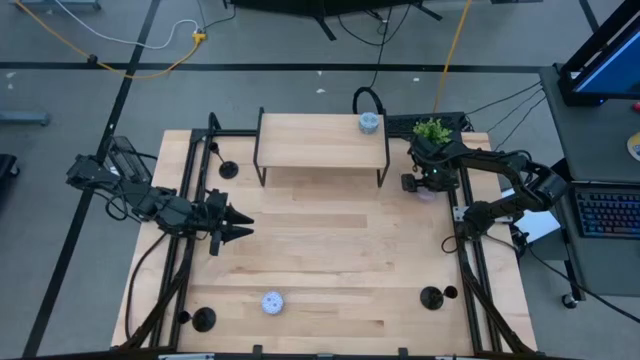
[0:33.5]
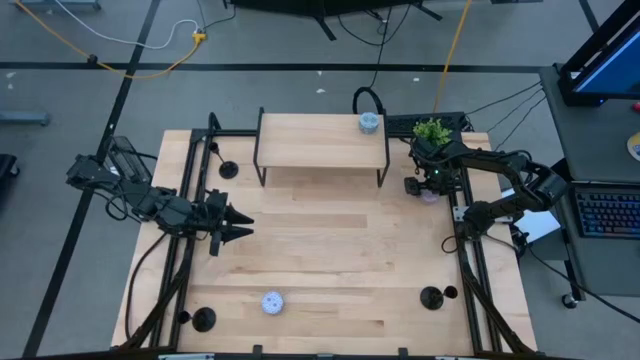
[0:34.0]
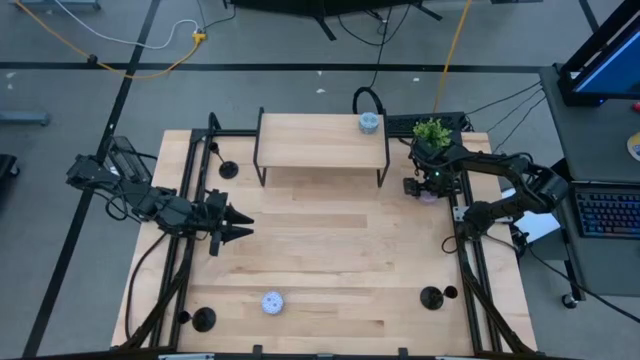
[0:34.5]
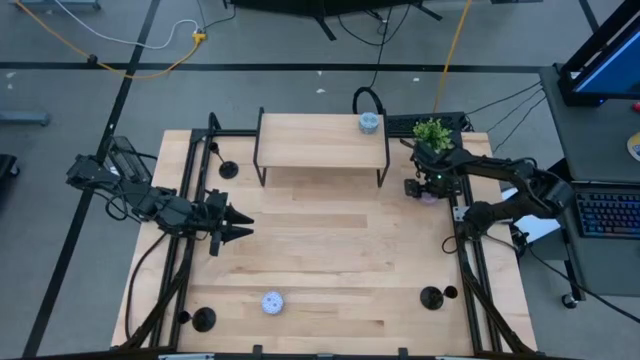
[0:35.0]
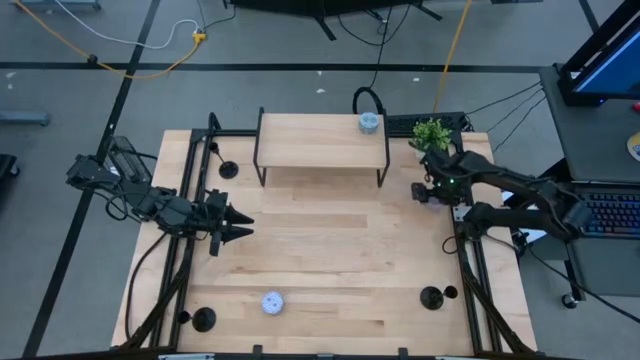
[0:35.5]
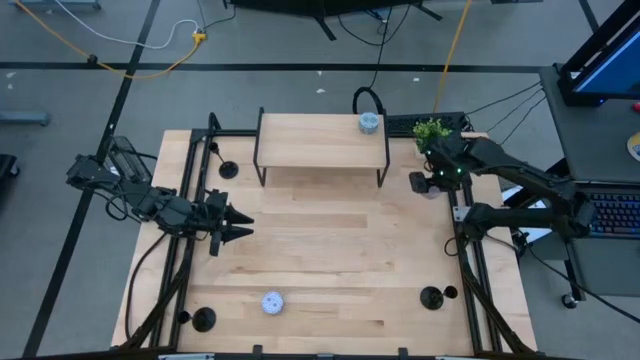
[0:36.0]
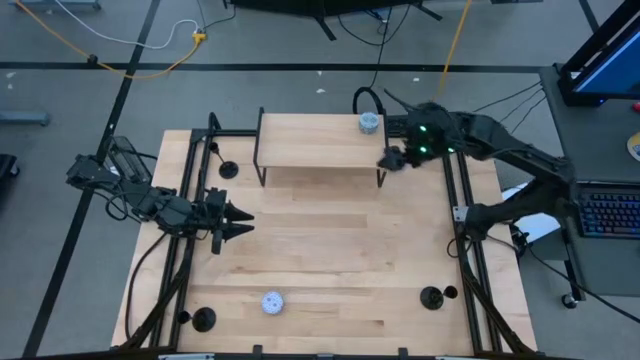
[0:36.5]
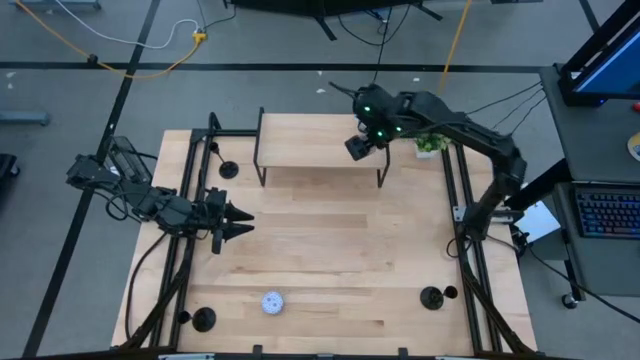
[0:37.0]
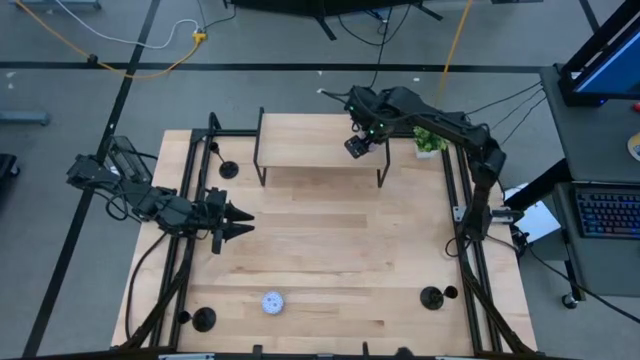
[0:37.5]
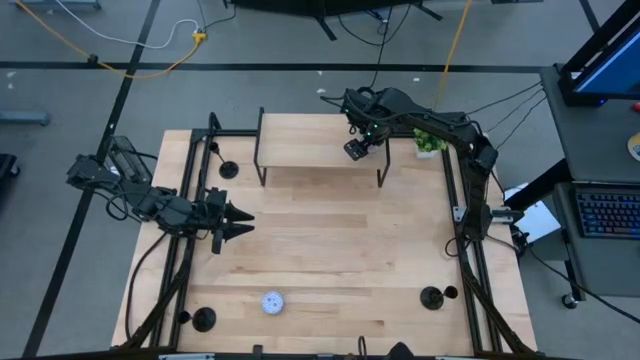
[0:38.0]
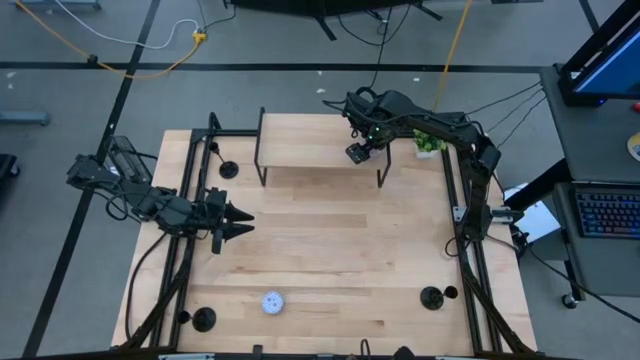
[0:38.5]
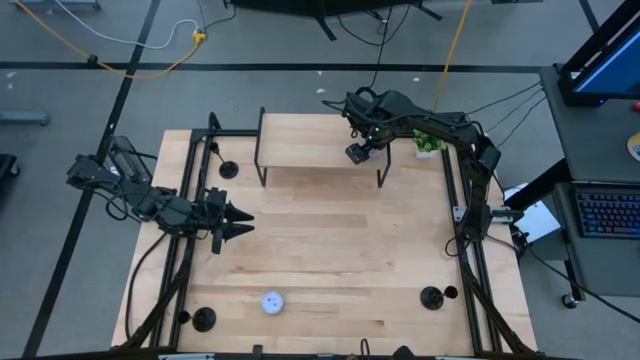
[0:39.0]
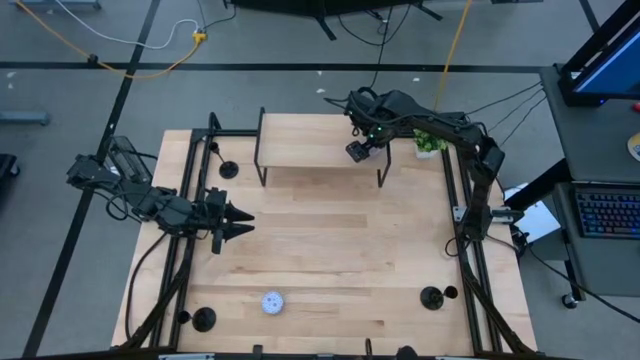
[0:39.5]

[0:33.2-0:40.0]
Task: Pick & Place candle stick holders
Put the purple scented candle on the shelf

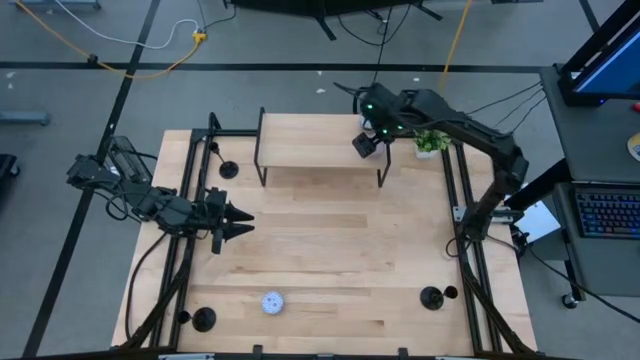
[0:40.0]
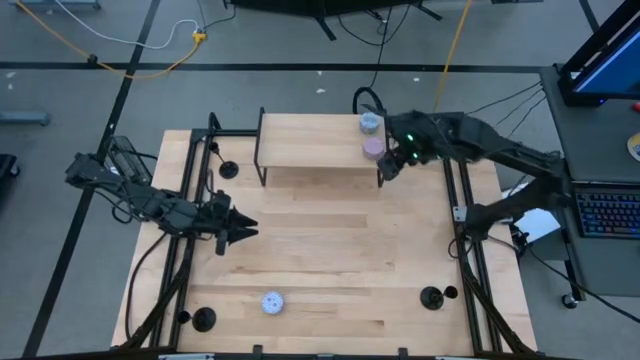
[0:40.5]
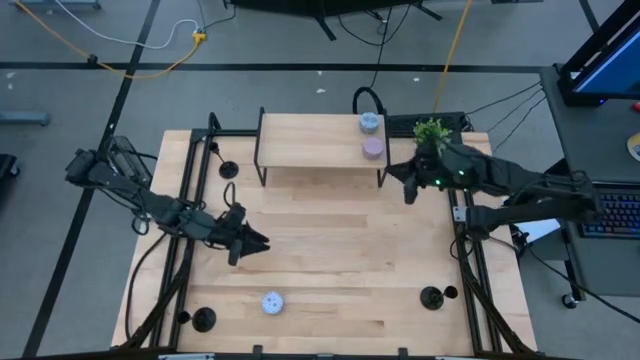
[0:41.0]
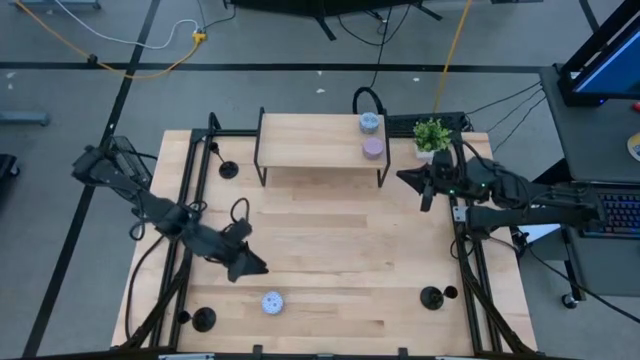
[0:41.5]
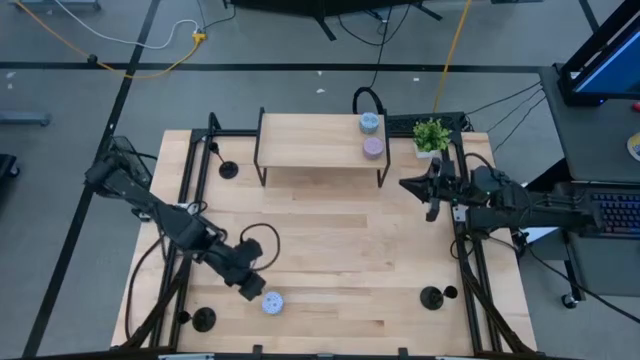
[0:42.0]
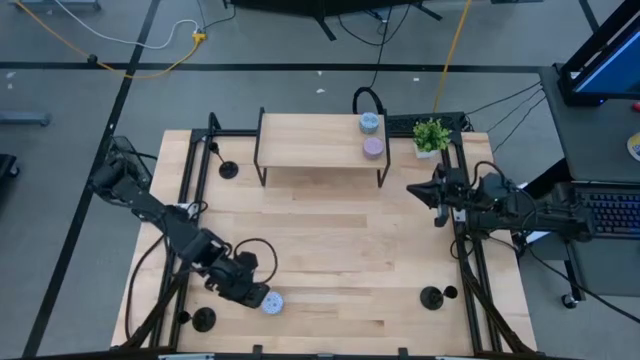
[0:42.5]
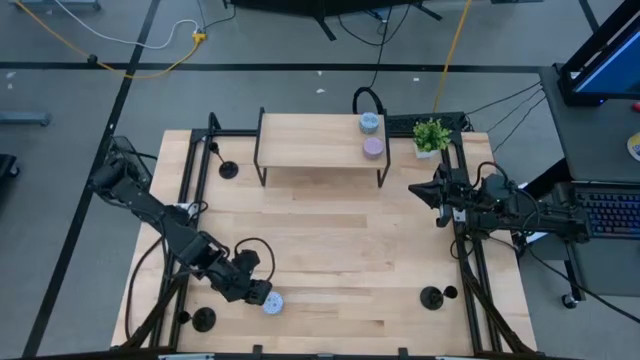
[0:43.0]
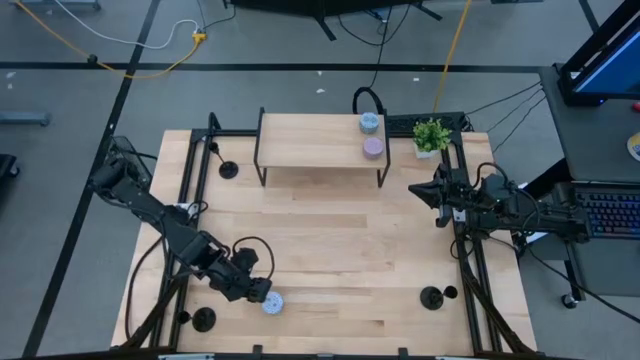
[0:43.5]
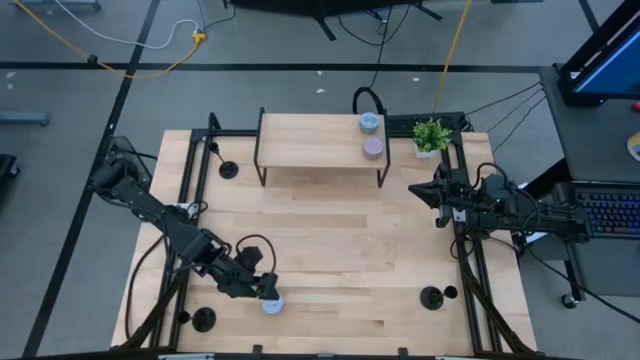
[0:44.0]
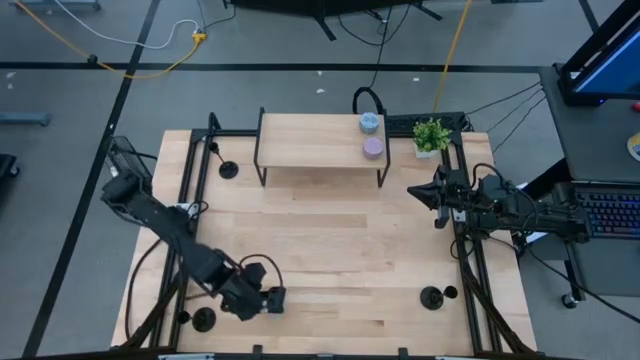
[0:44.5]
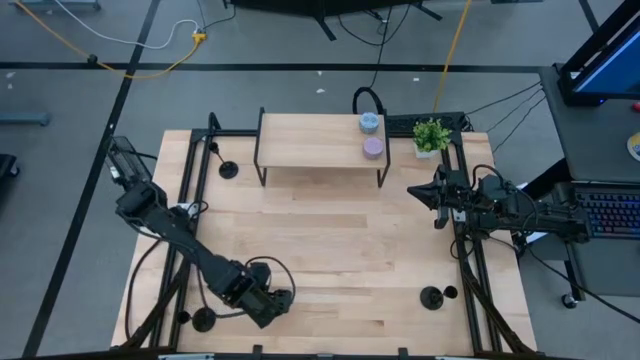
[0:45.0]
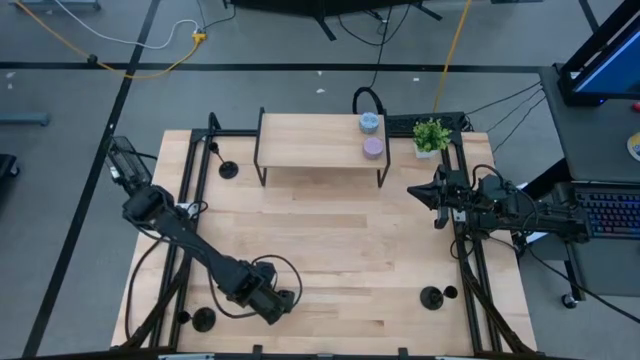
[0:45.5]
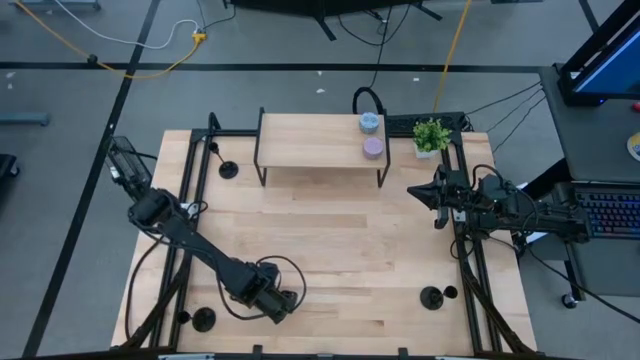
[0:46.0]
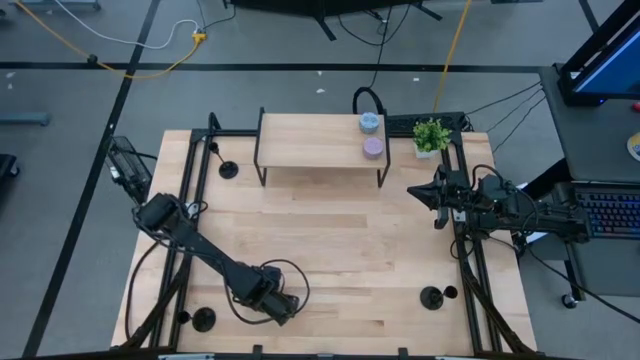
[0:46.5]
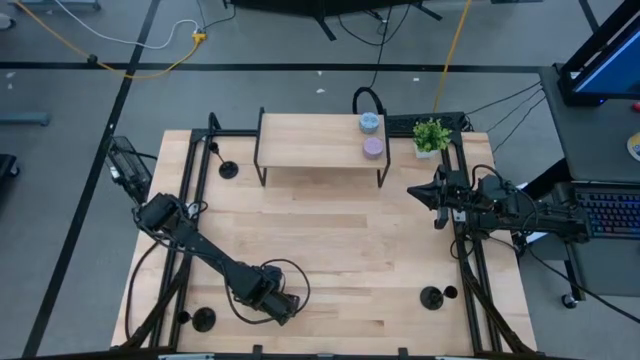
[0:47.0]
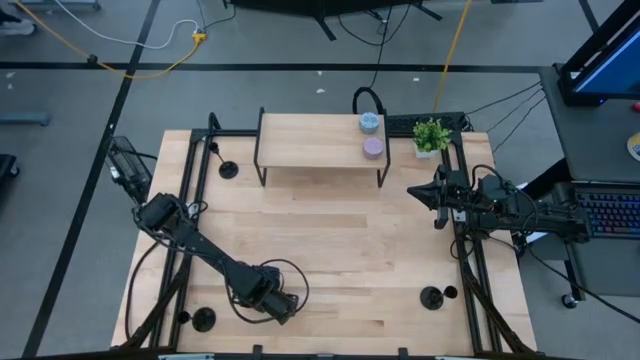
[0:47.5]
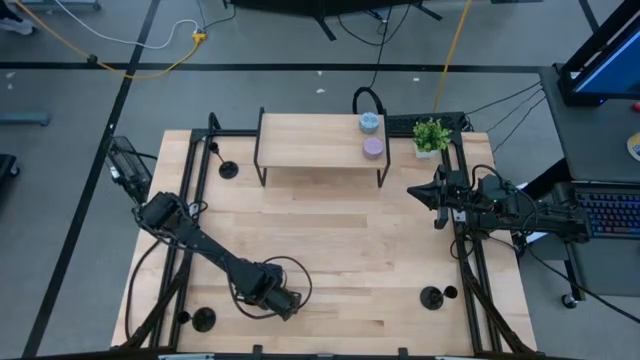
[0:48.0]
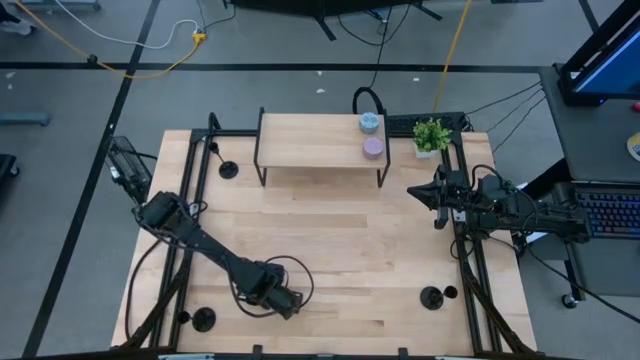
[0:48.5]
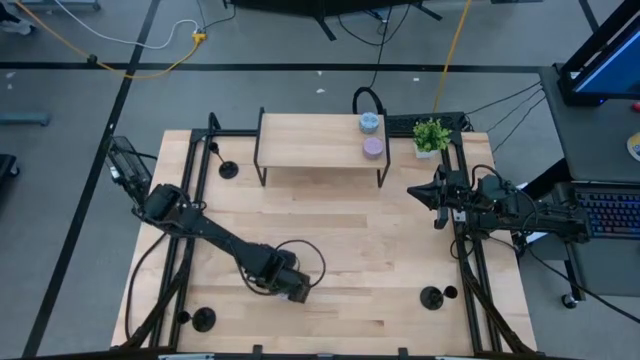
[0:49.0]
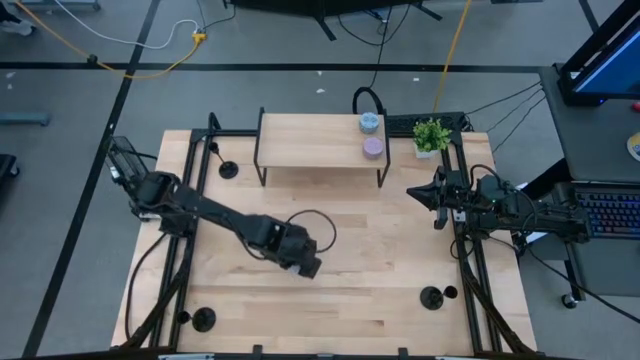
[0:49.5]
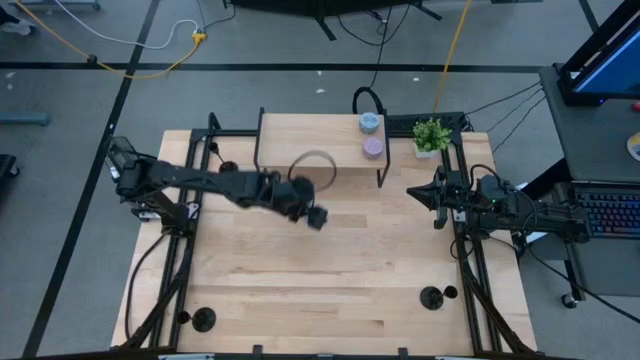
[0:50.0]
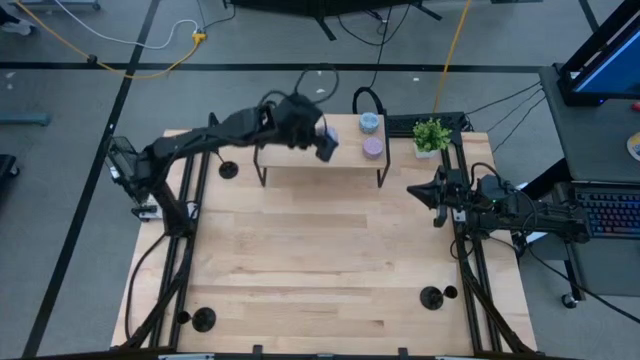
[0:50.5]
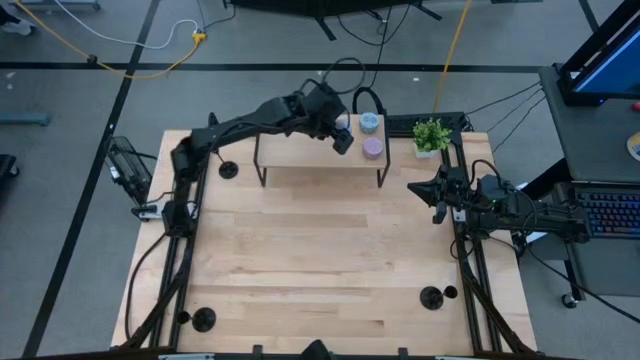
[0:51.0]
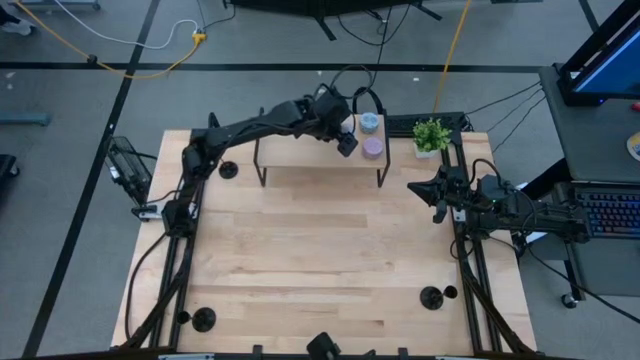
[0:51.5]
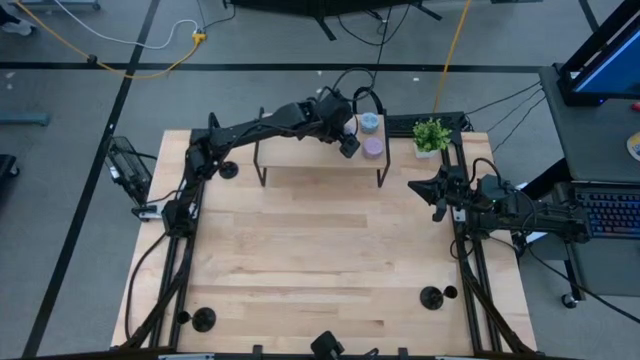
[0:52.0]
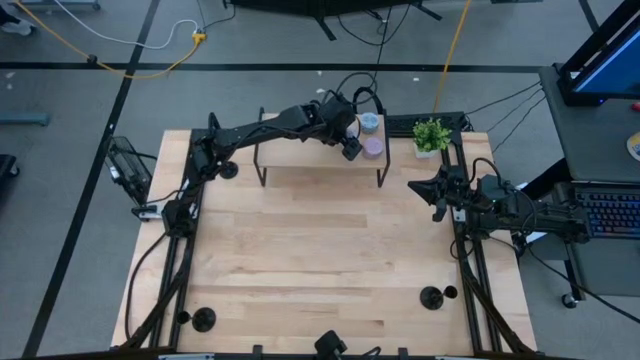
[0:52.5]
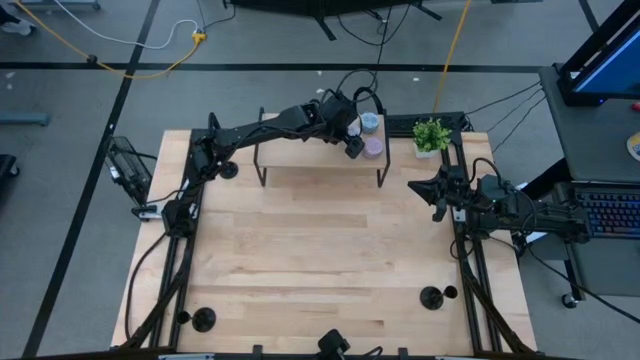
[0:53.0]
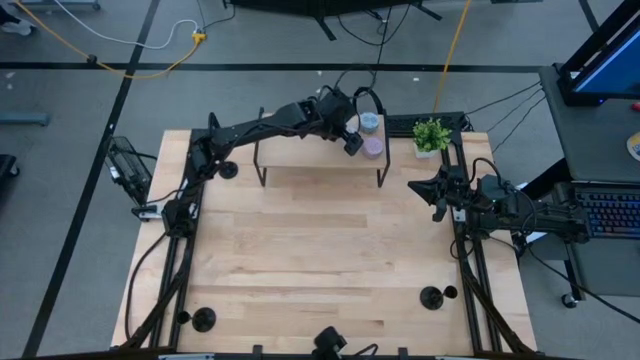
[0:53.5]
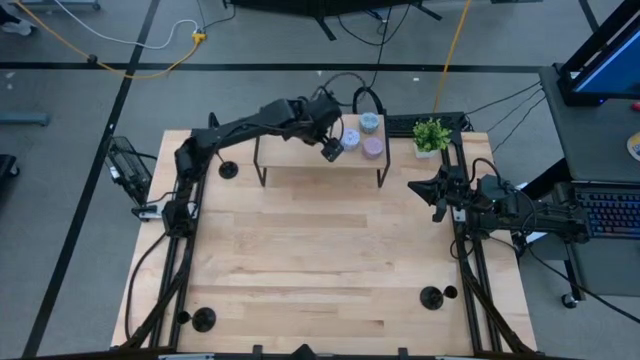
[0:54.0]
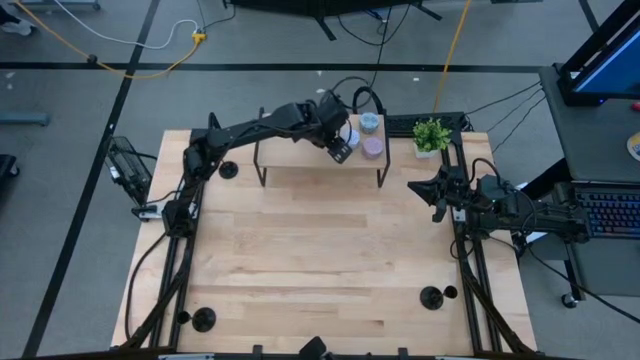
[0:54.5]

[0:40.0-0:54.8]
Put the red scented candle on the shelf
